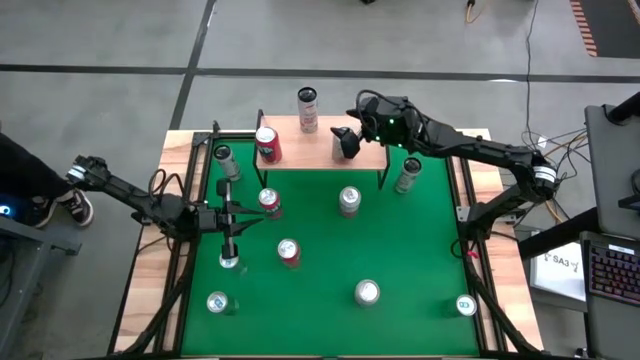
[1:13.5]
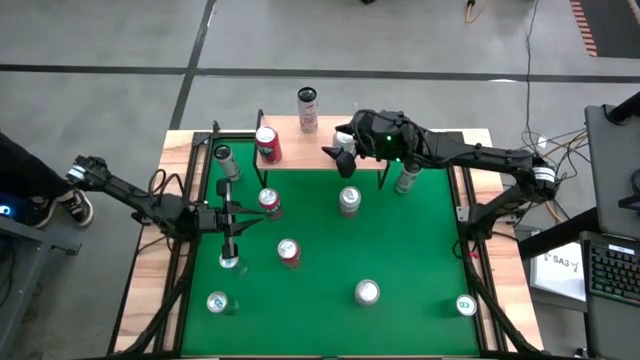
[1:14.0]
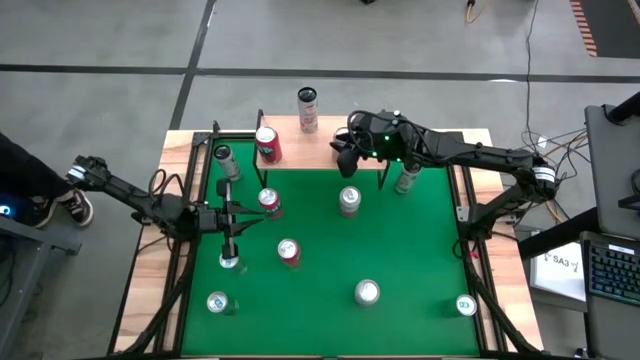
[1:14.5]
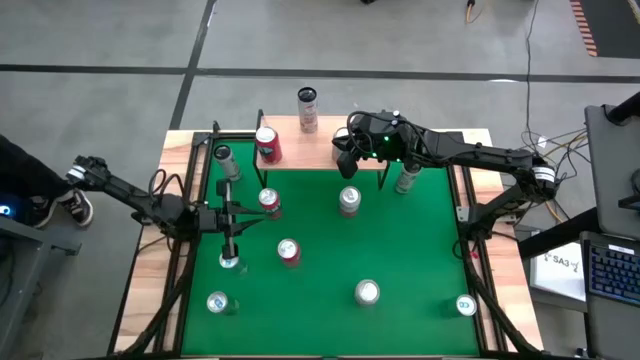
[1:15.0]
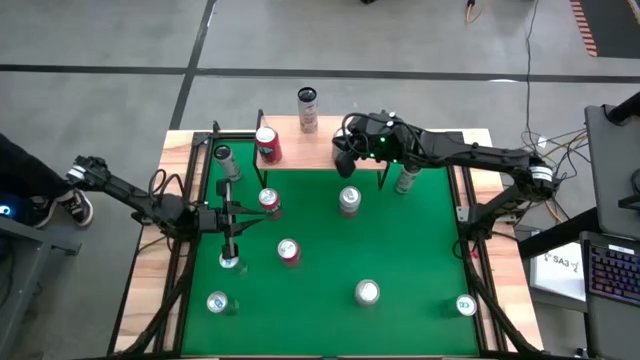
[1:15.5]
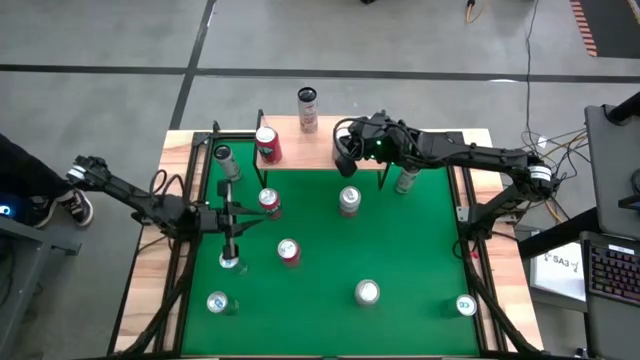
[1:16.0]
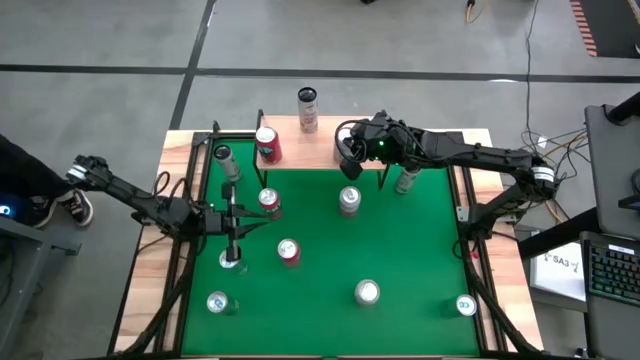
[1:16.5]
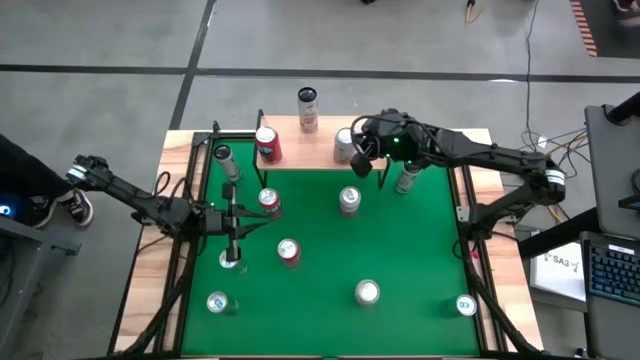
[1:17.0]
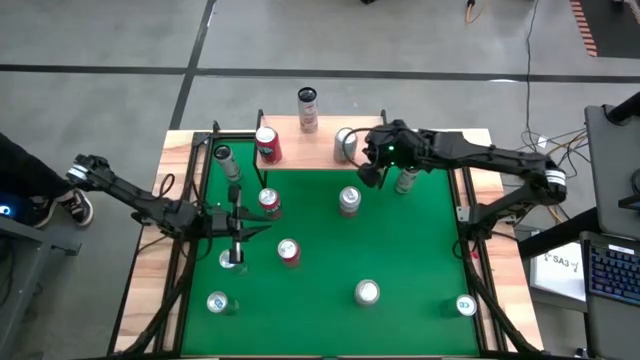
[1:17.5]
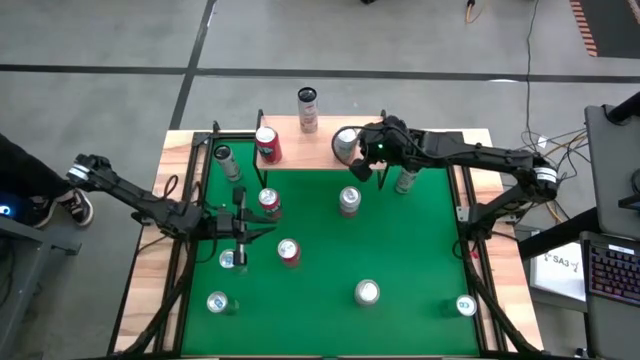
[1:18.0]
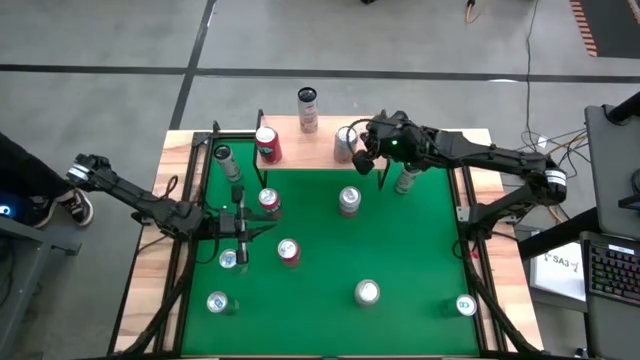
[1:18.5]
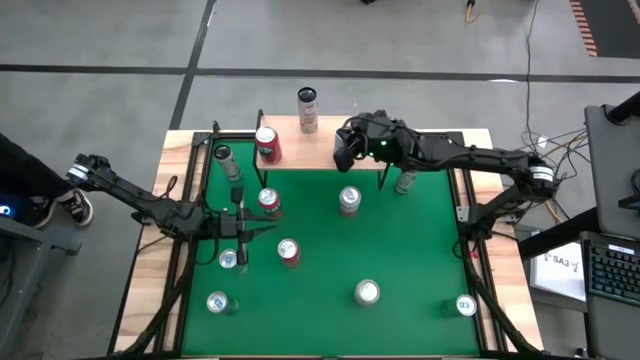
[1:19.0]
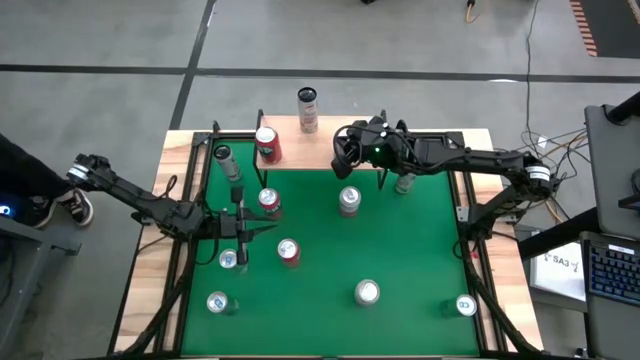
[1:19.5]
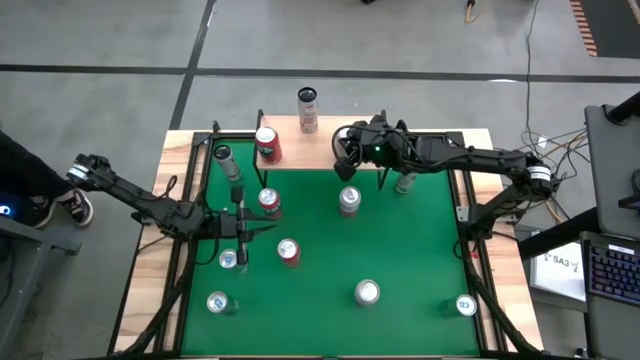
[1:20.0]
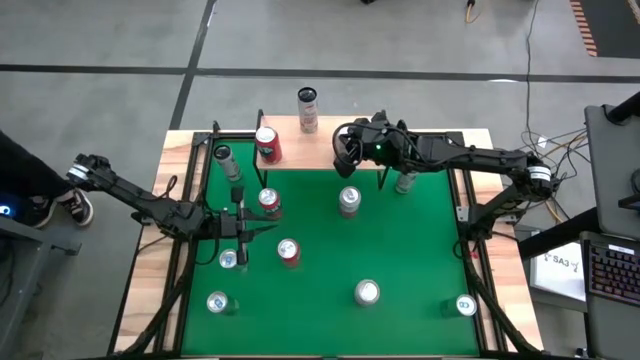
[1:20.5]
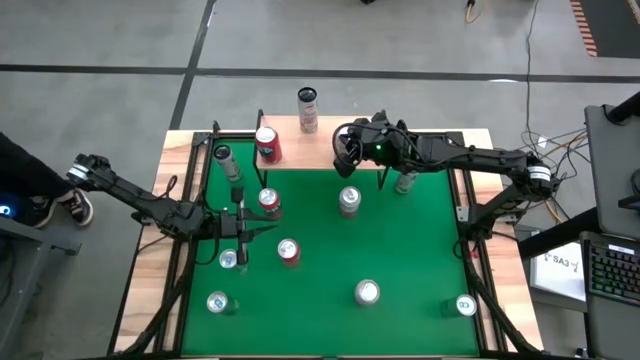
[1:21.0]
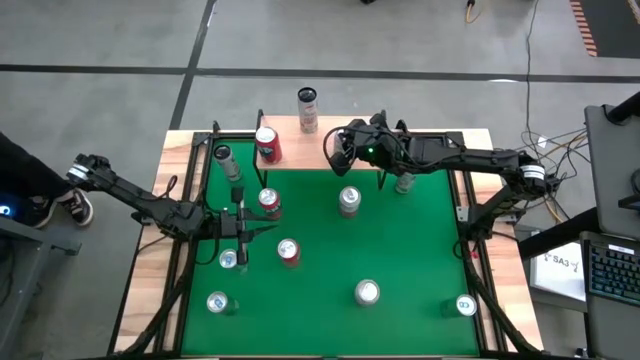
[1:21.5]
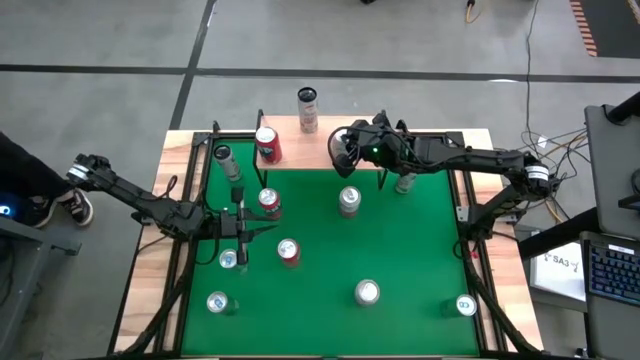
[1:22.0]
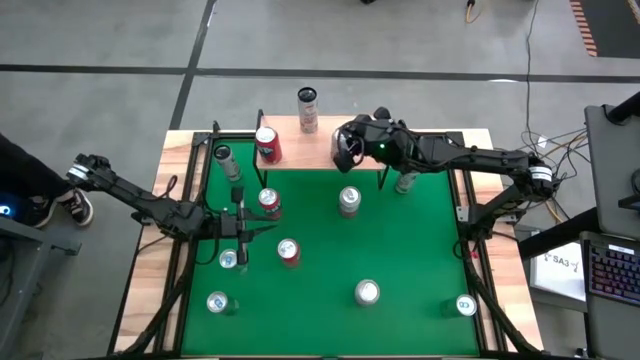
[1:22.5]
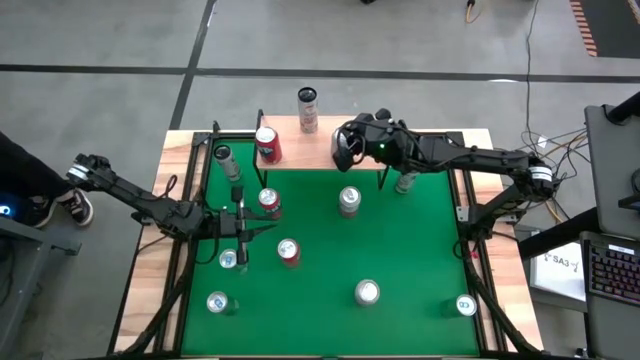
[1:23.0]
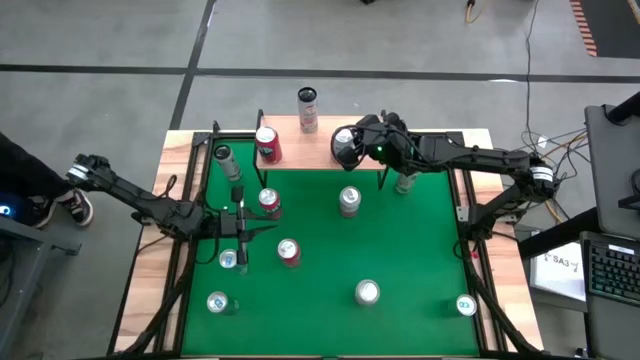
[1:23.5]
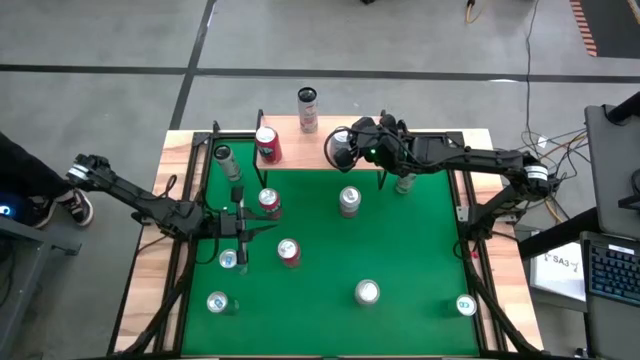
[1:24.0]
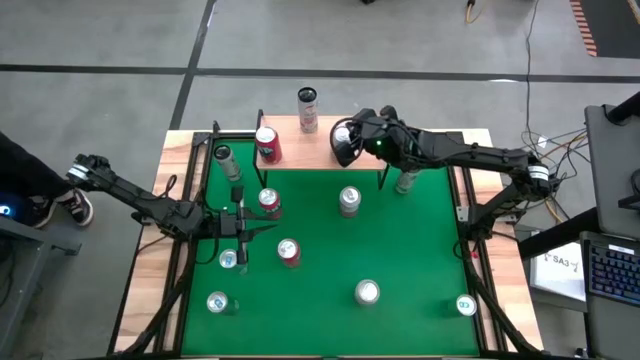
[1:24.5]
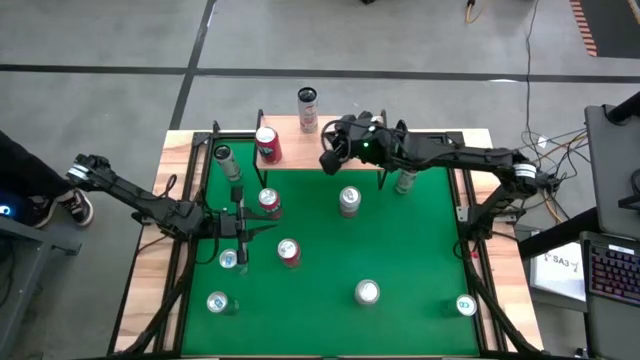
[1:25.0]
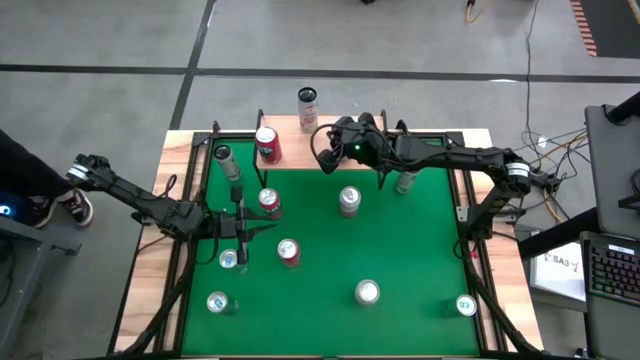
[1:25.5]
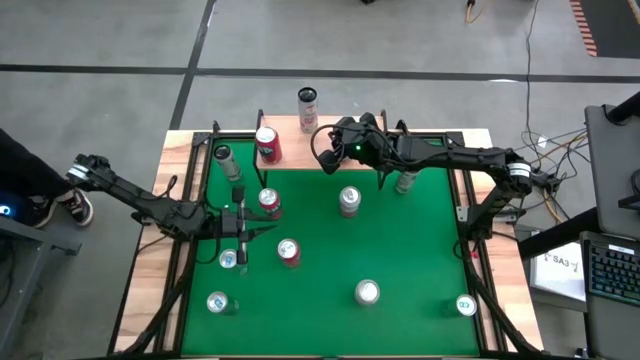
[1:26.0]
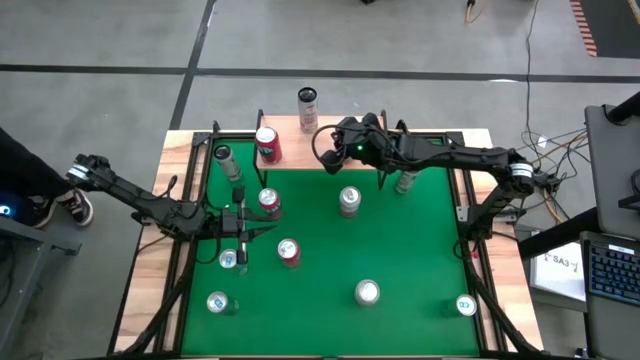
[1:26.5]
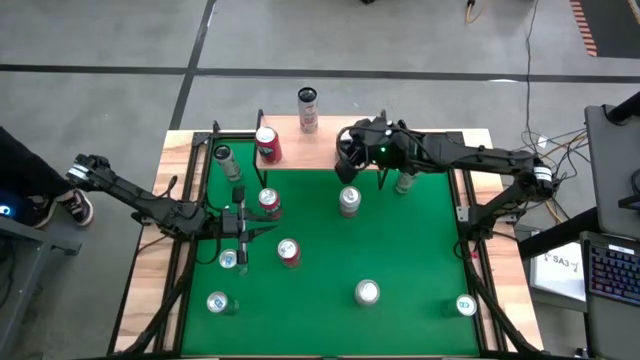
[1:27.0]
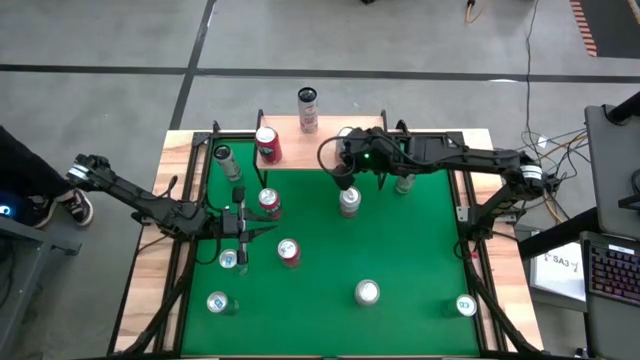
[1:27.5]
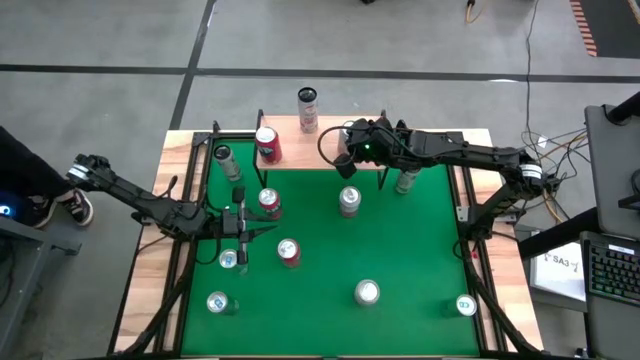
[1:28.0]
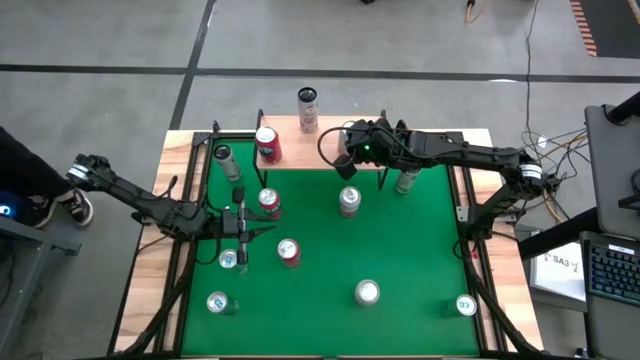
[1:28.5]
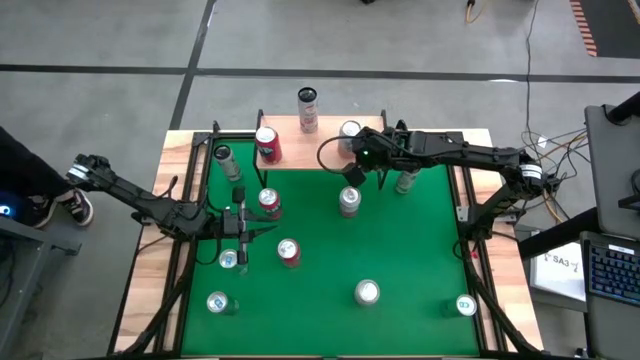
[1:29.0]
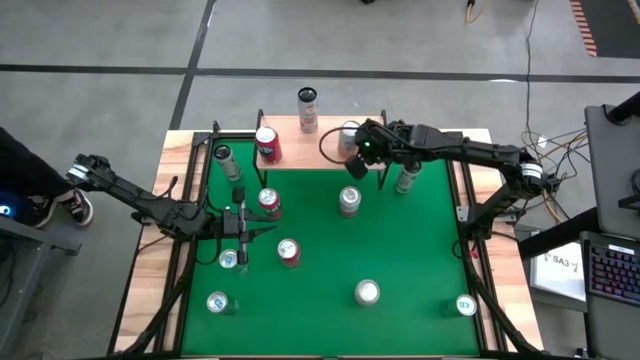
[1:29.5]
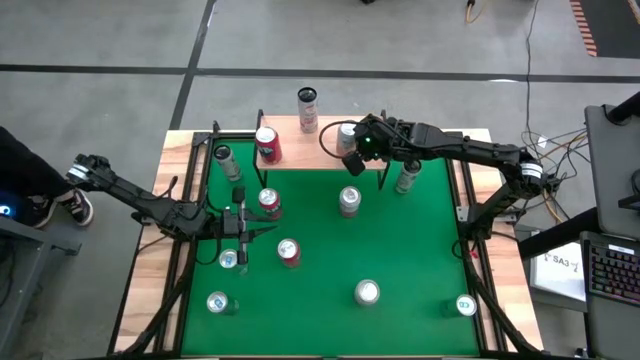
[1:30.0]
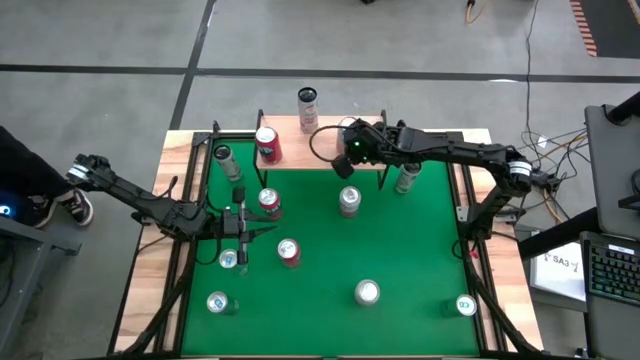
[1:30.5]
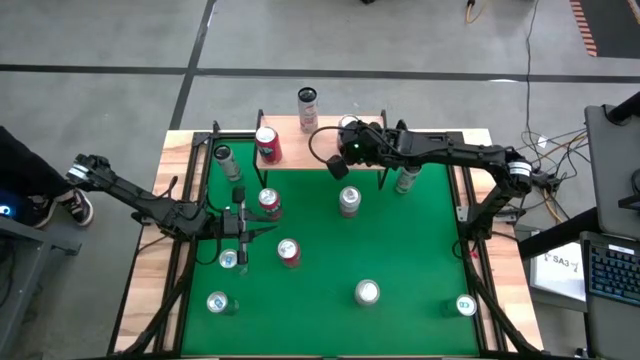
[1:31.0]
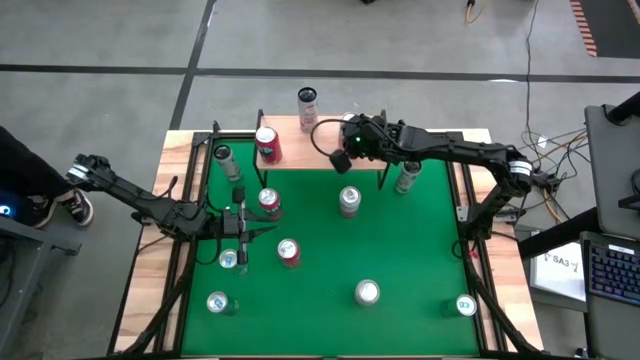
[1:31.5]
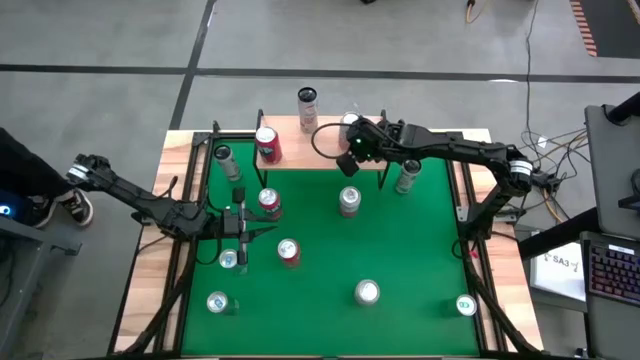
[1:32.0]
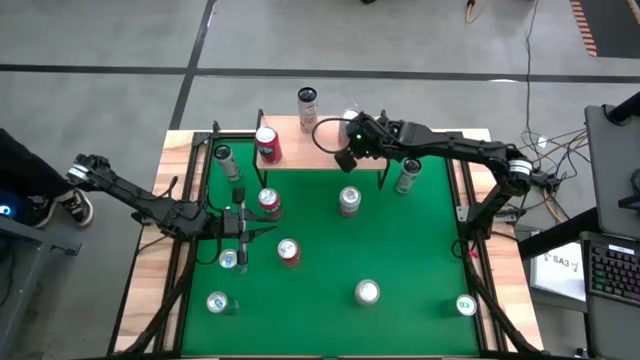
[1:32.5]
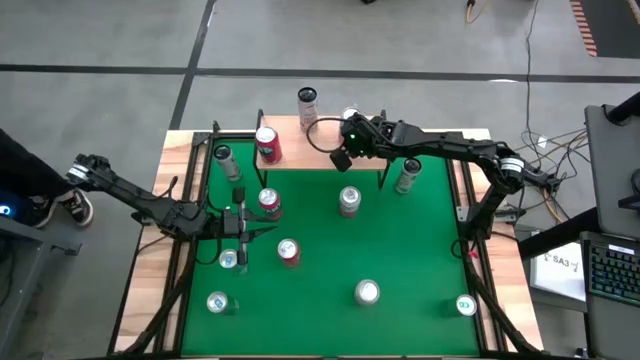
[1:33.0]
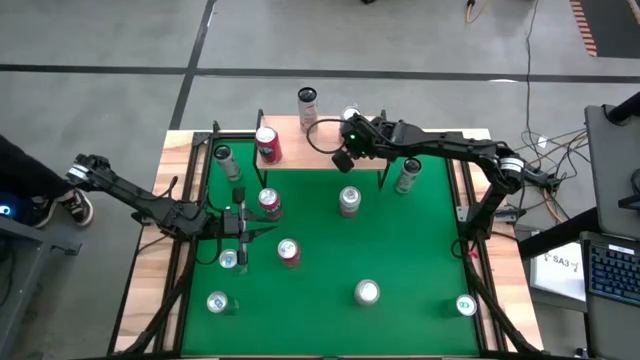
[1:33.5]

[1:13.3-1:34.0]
Task: Place canned beverage on shelf
Put the bottom right white orange soda can on the shelf

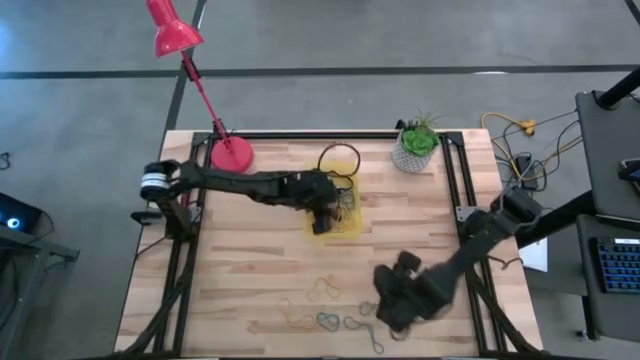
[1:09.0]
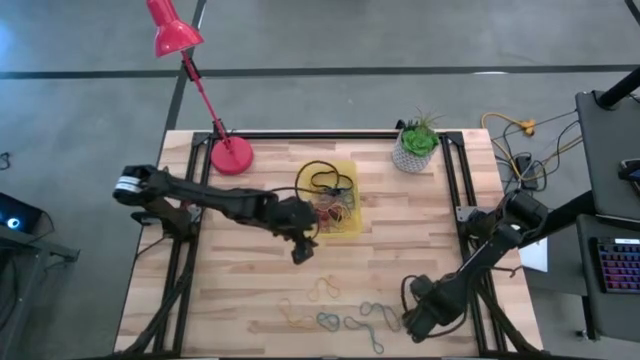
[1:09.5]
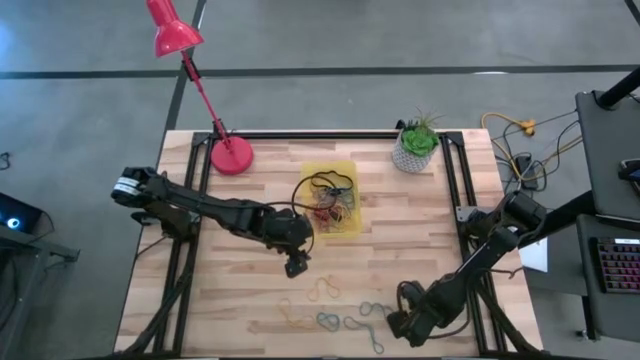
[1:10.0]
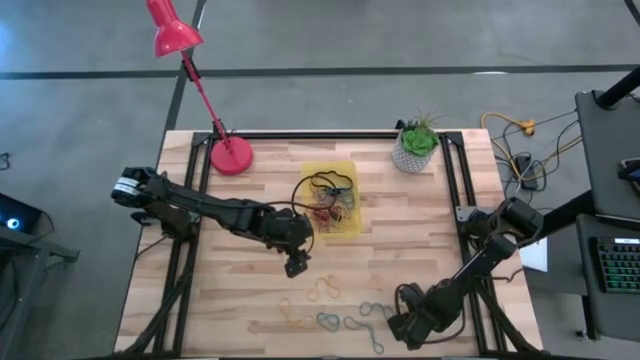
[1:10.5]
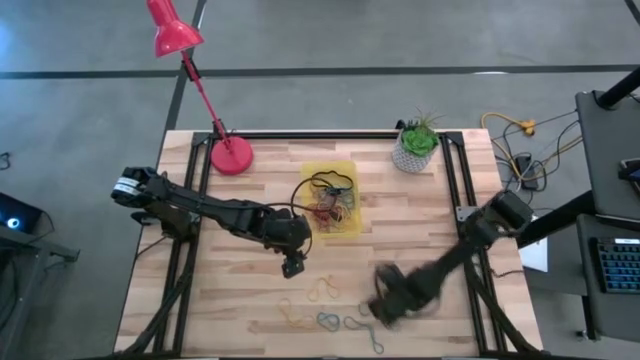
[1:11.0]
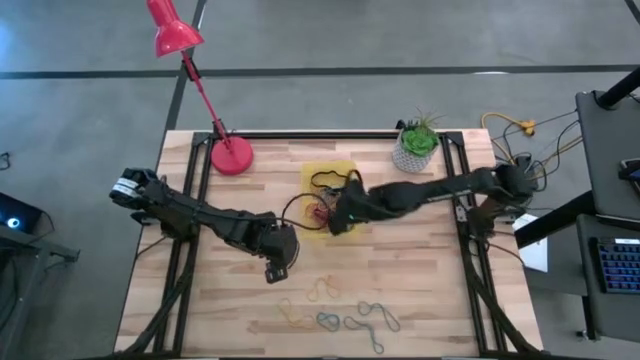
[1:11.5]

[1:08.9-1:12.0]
Task: Pick and place rubber bands into bin
Put the yellow rubber band into the yellow bin
